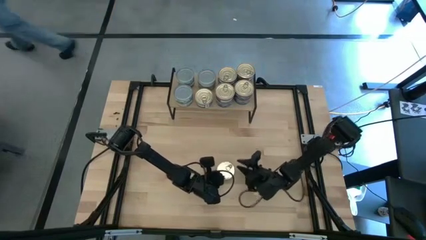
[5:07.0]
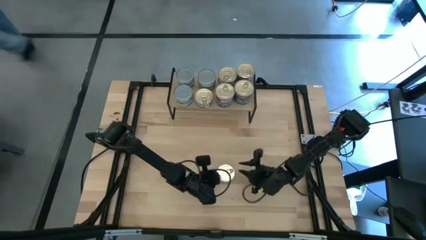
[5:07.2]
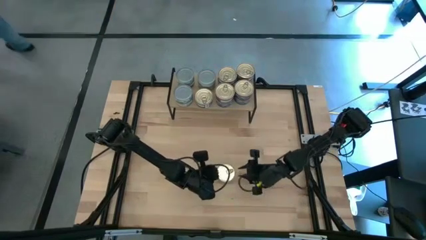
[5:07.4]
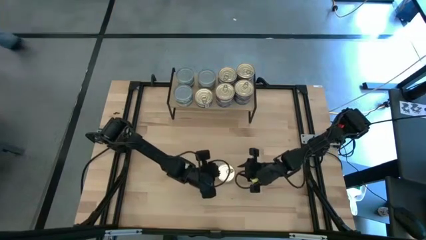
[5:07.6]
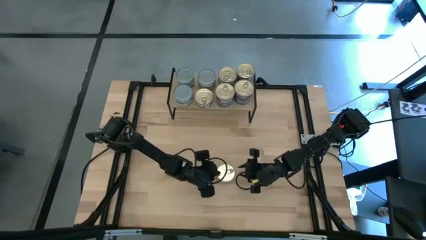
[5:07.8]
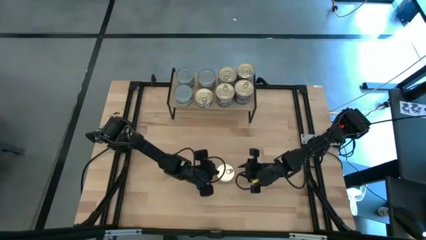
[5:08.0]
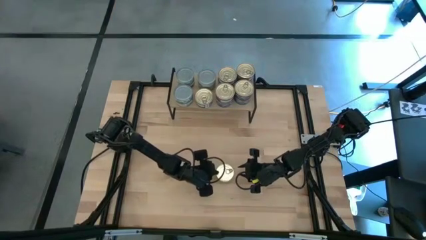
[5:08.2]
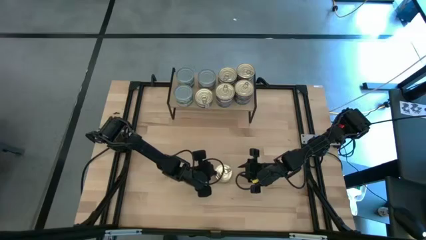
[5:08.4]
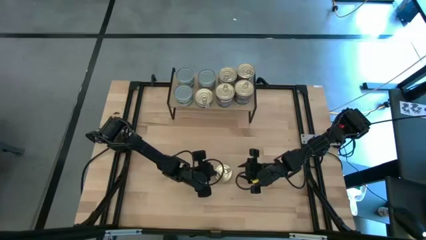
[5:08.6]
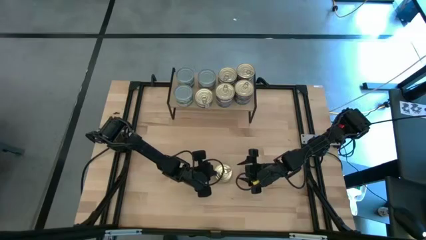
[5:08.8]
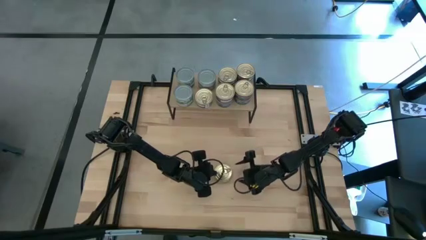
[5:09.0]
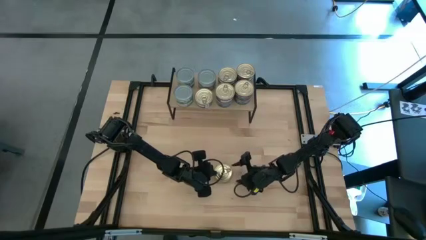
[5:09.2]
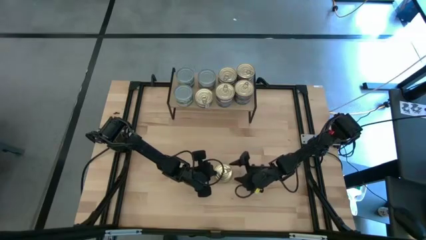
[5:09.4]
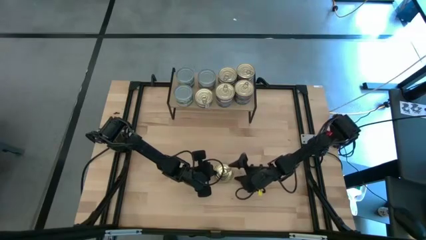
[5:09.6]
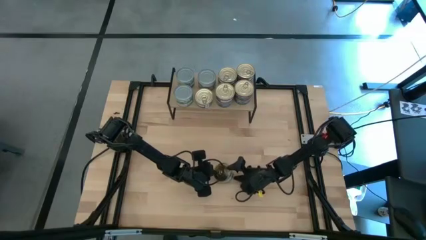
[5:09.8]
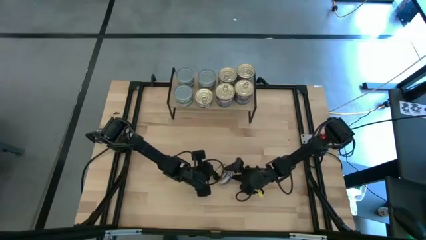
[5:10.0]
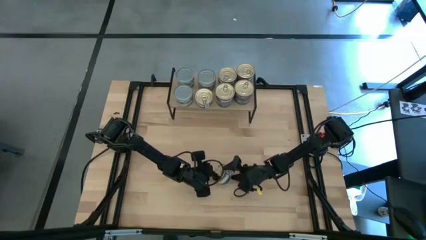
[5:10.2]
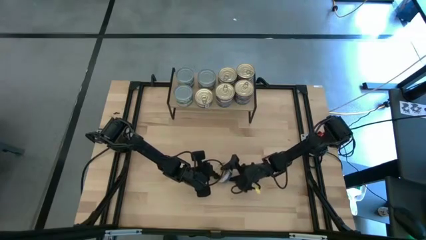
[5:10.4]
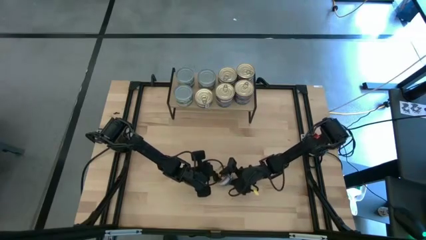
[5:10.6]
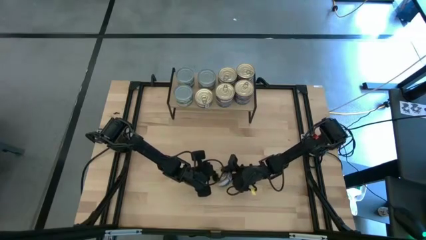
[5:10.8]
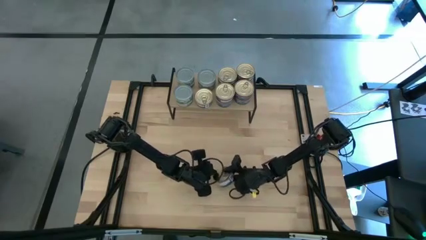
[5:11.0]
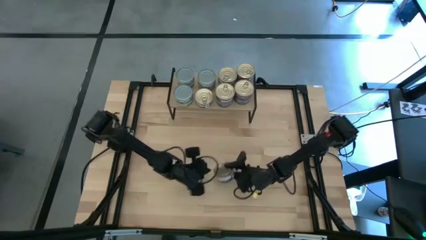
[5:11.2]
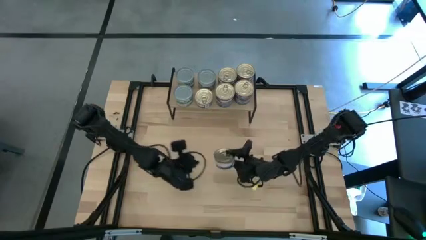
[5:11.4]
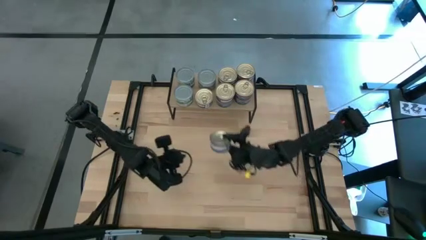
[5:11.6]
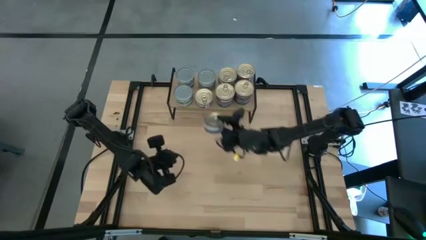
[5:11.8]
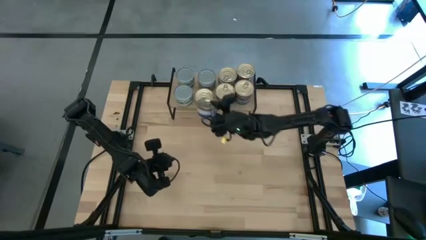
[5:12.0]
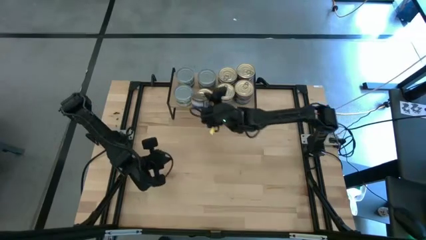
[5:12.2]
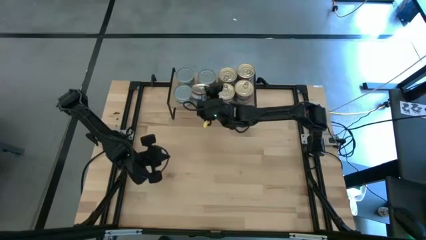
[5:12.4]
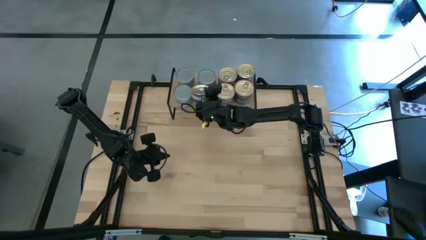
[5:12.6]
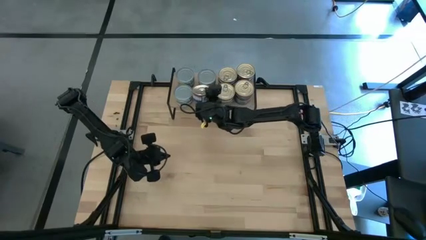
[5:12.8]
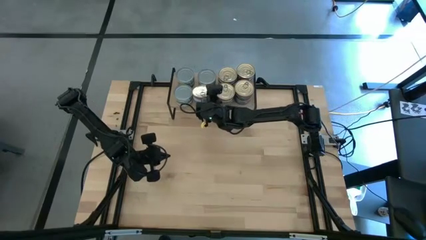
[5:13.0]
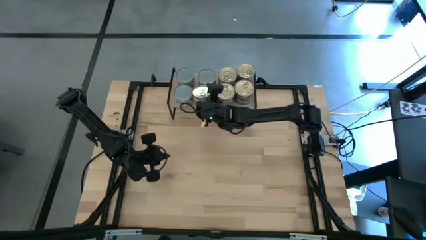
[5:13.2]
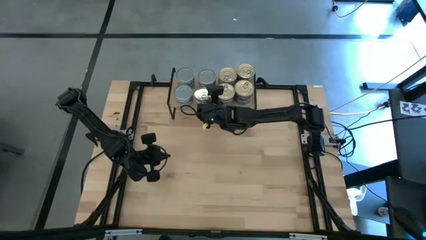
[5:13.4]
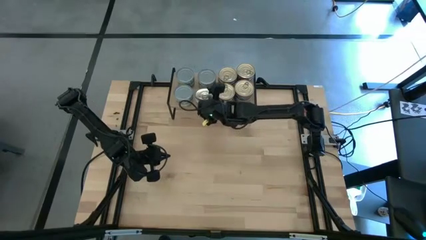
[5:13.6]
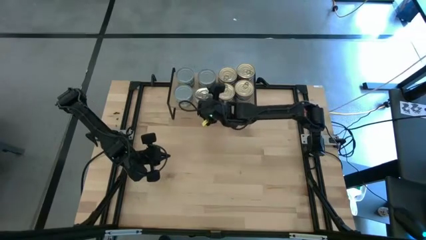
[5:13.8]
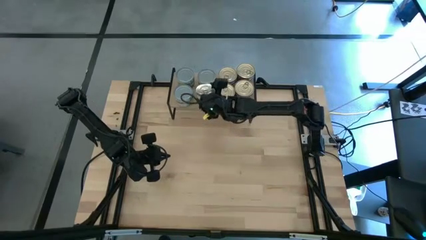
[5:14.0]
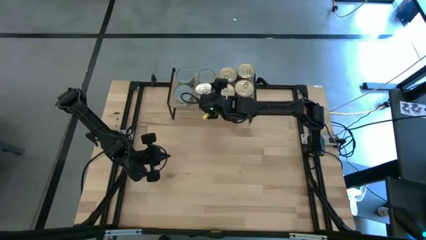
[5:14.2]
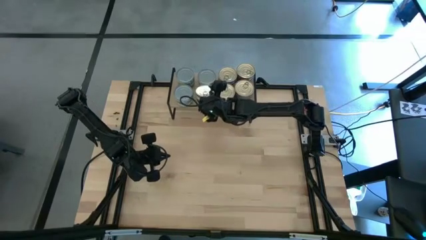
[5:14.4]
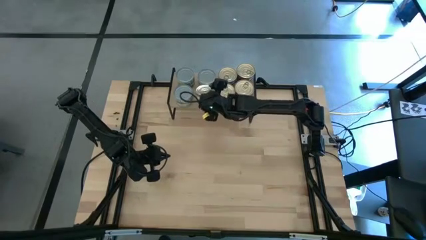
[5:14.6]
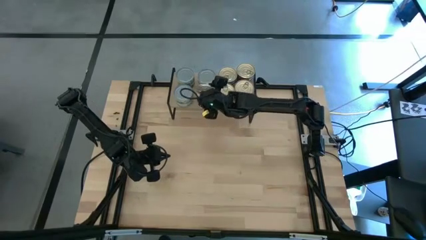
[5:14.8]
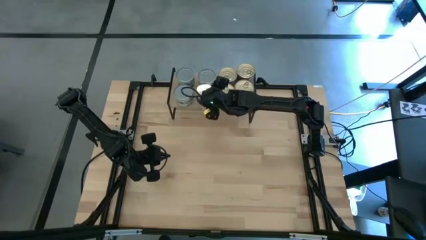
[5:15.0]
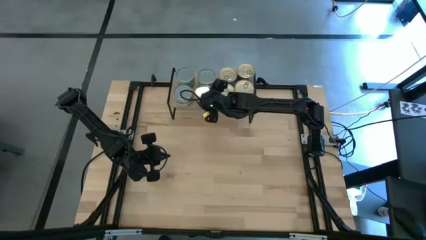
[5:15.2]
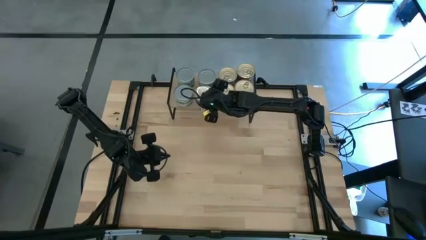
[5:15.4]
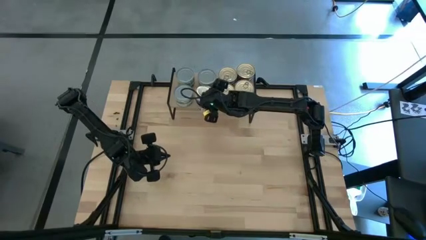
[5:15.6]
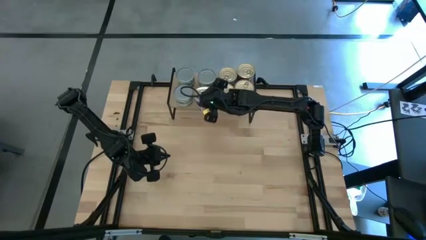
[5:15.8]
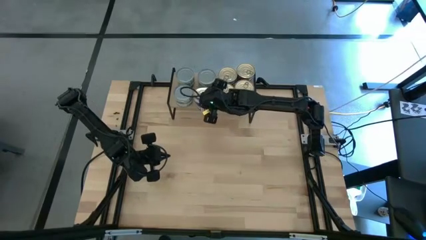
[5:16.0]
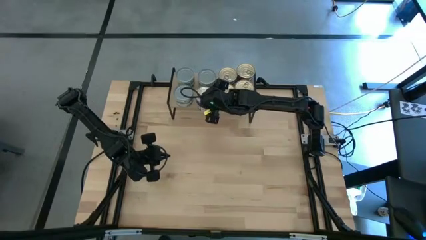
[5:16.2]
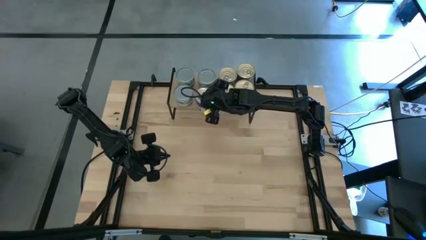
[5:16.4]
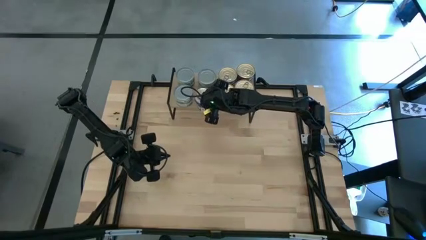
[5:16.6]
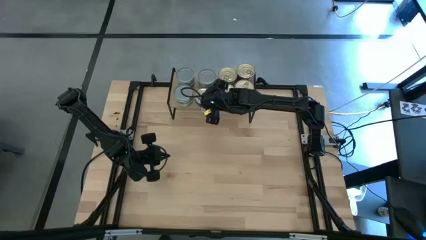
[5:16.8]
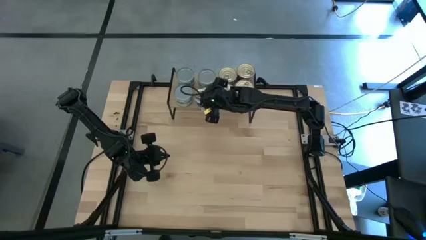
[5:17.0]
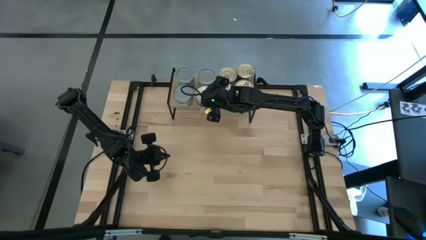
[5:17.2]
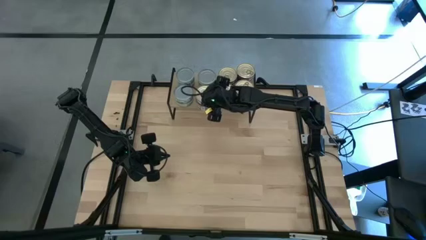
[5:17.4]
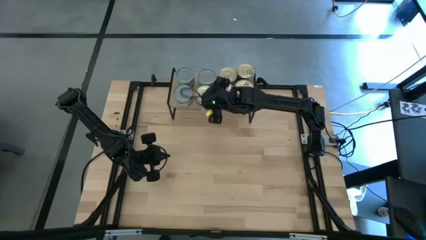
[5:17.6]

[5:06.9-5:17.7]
Task: Stack canned seafood by type on shelf
Stack the blue pink tuna can with the blue pink tuna can on the shelf

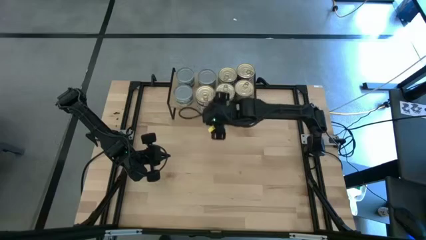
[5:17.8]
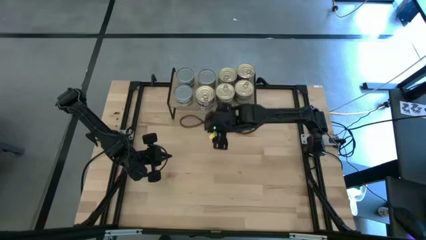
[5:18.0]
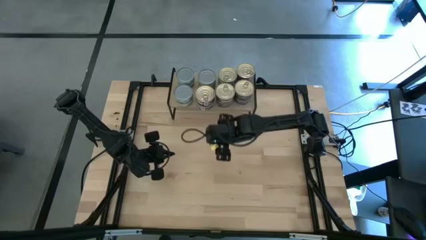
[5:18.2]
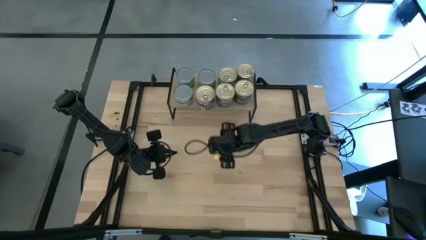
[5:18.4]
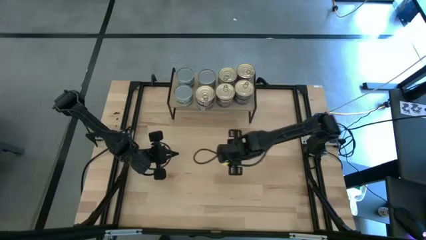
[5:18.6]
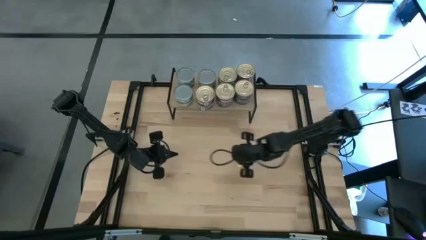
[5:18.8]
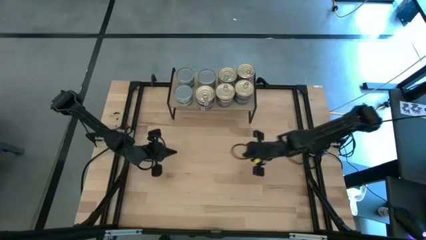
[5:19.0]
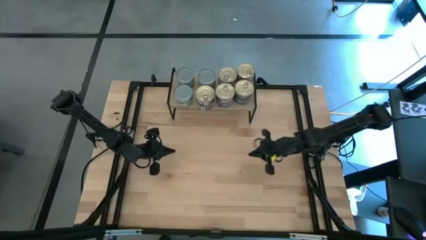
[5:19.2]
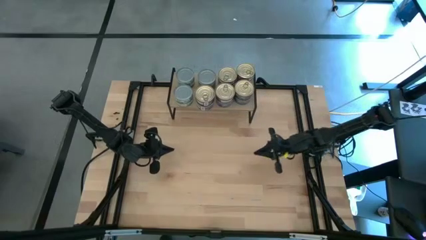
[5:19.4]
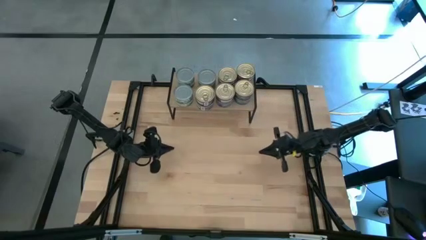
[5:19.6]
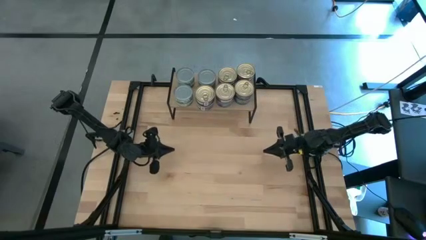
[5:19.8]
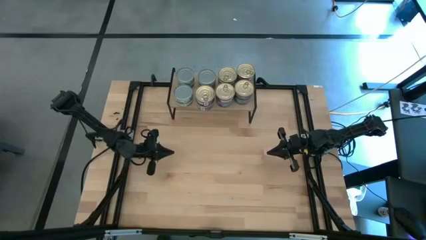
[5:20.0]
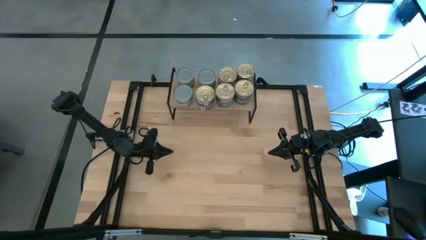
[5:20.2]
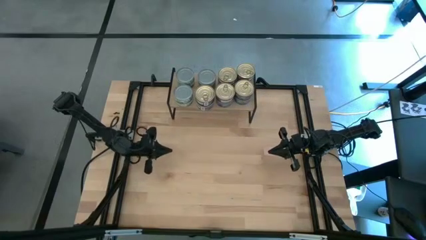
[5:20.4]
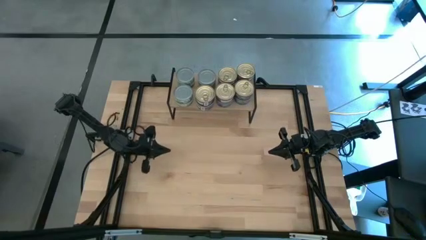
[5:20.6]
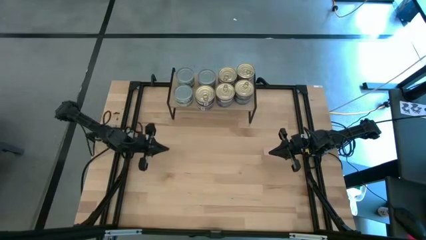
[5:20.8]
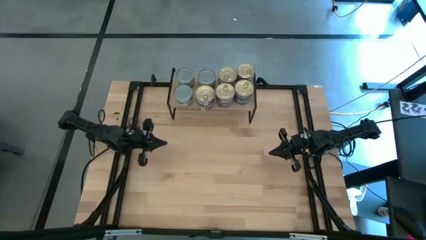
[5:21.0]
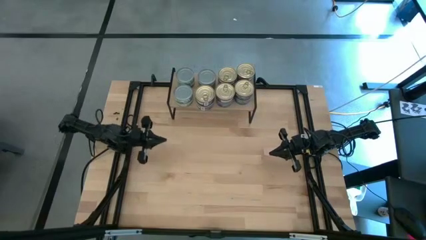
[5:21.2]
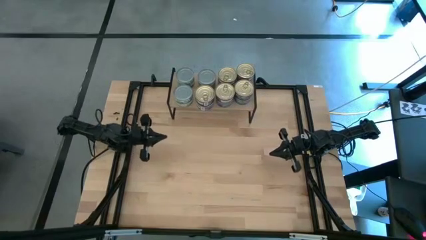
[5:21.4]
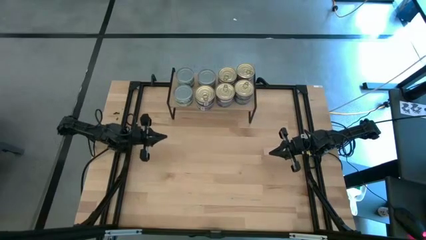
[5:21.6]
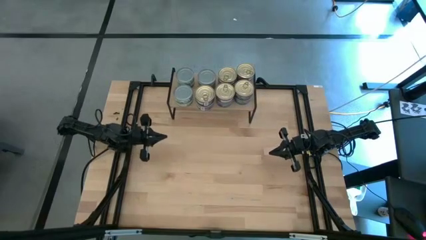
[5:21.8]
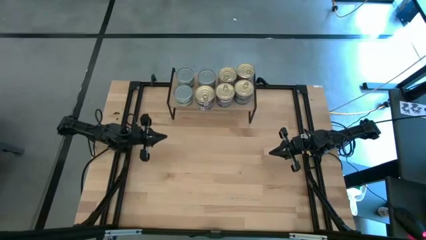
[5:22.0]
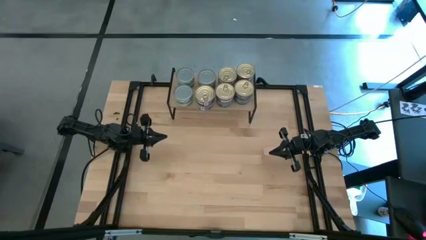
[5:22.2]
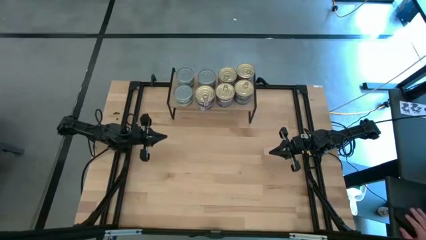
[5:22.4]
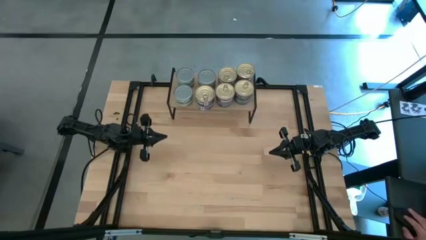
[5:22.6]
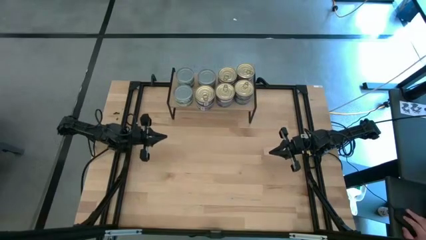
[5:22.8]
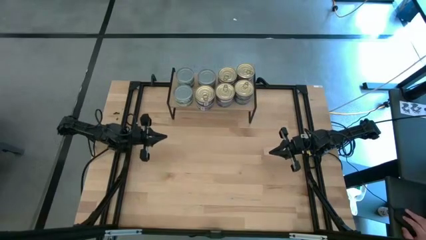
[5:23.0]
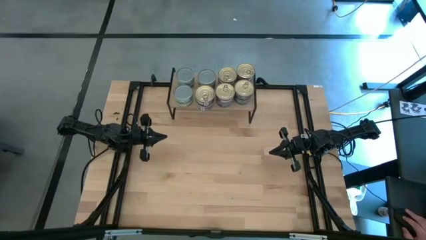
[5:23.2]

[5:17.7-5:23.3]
Return to Home Position

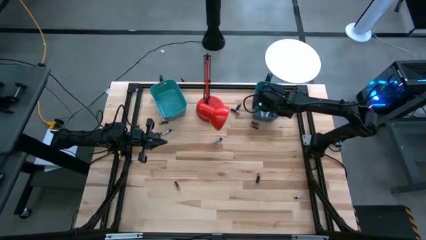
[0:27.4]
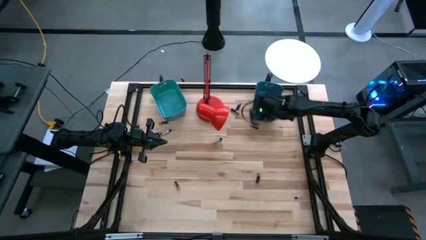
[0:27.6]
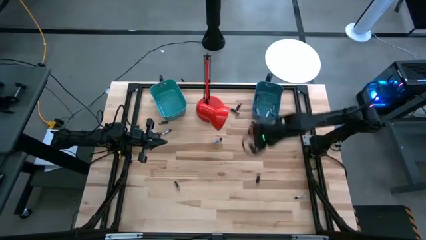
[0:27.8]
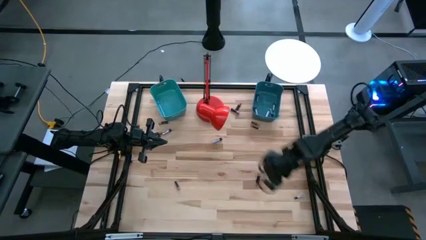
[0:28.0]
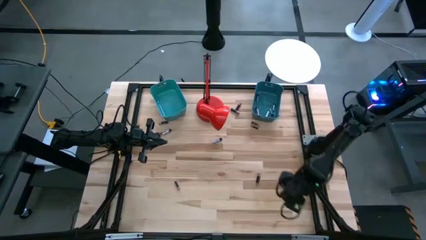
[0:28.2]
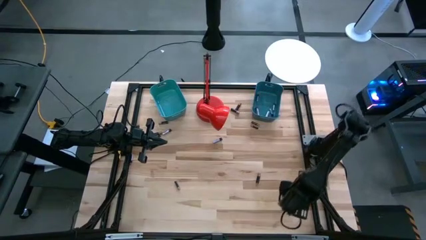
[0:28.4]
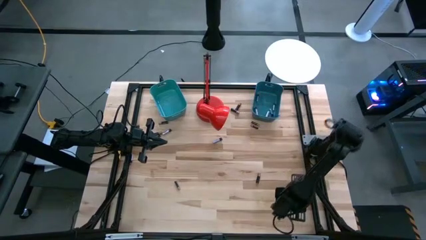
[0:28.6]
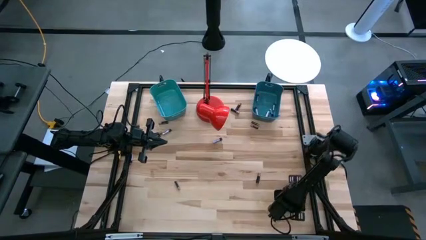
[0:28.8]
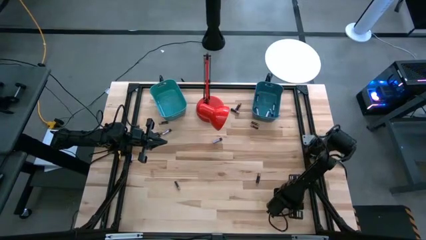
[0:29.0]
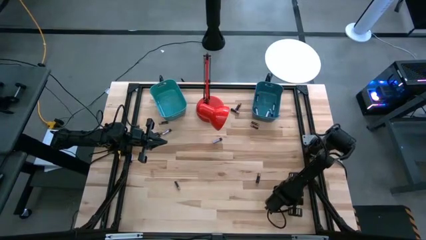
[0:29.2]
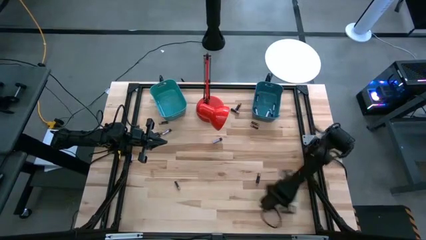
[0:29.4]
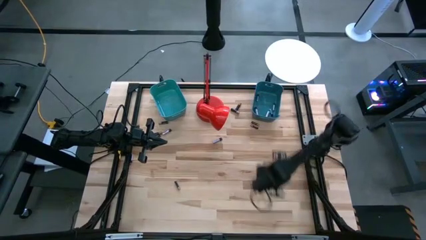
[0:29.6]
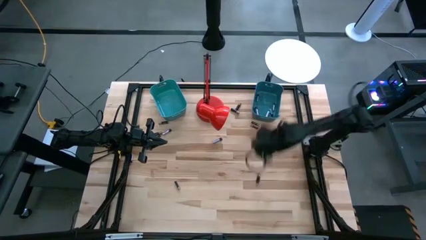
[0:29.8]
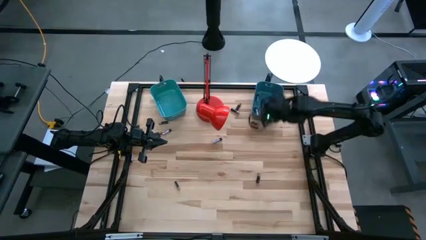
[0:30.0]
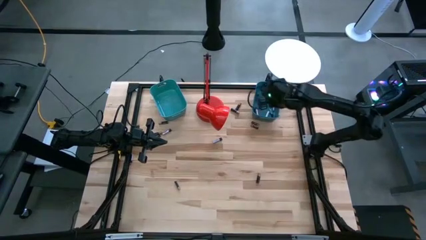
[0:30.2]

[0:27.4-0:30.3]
Task: Sort batteries
Put the silver battery into the blue bin
